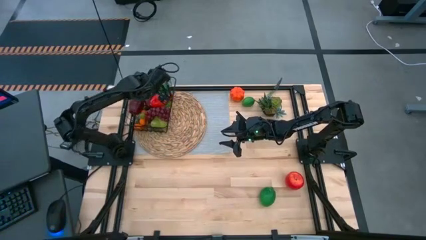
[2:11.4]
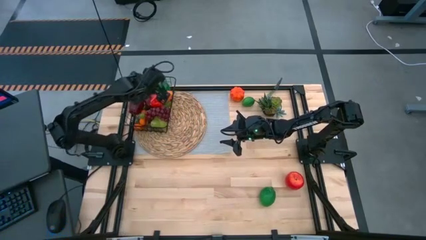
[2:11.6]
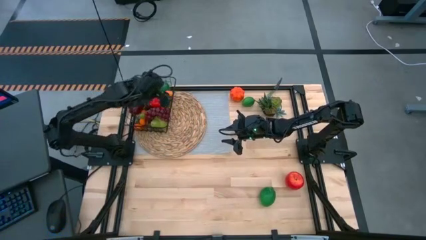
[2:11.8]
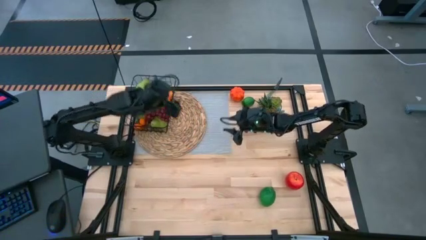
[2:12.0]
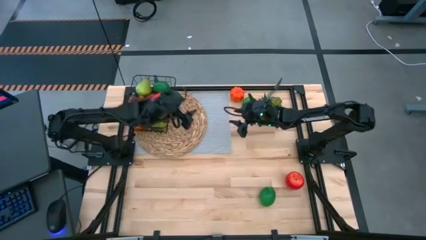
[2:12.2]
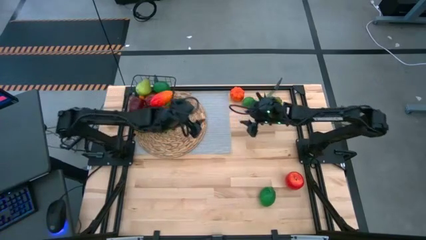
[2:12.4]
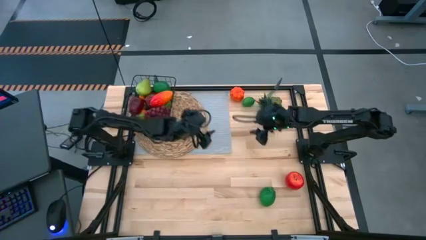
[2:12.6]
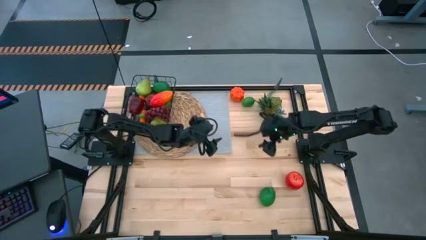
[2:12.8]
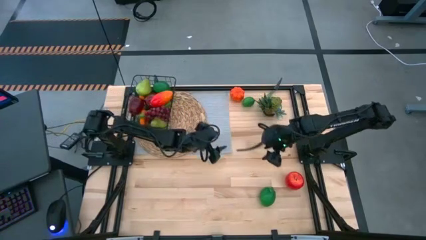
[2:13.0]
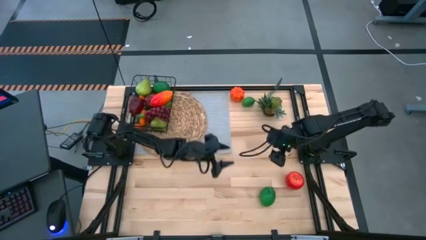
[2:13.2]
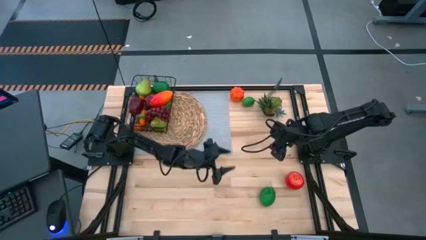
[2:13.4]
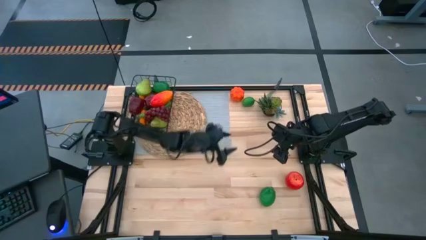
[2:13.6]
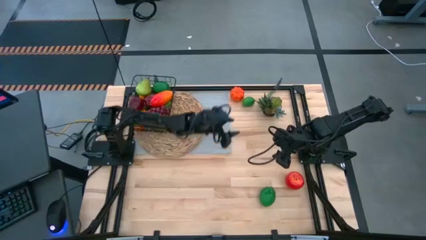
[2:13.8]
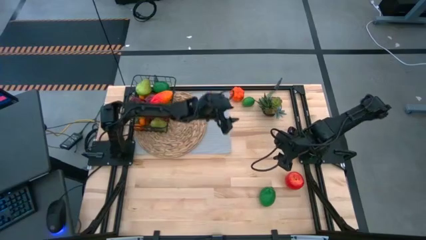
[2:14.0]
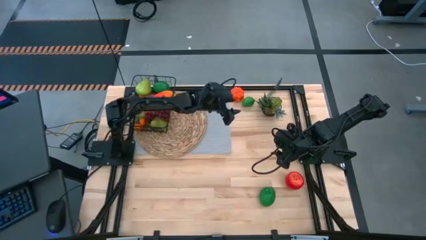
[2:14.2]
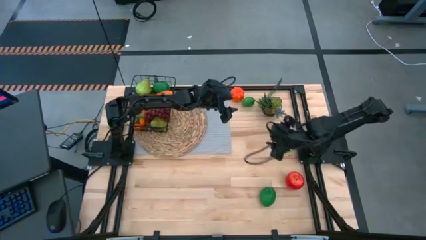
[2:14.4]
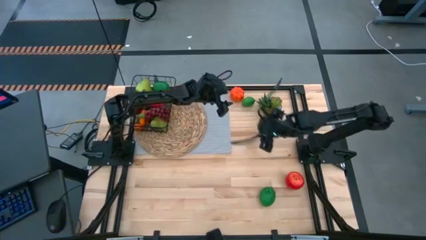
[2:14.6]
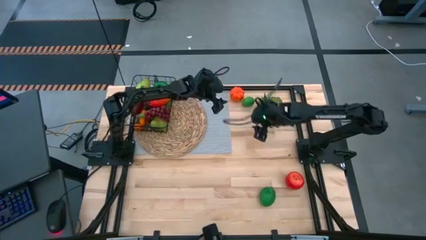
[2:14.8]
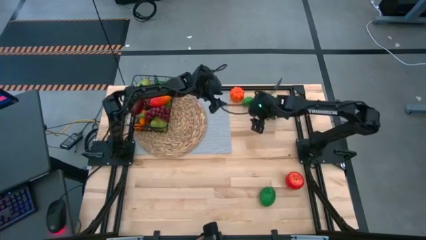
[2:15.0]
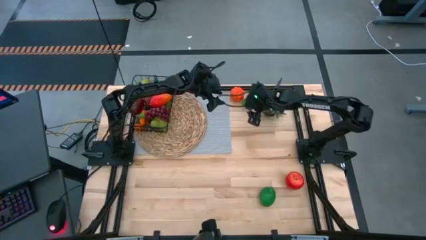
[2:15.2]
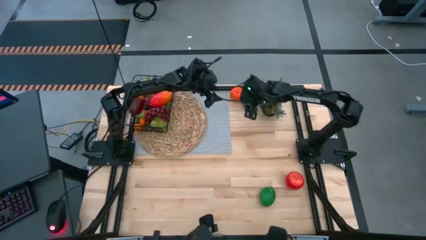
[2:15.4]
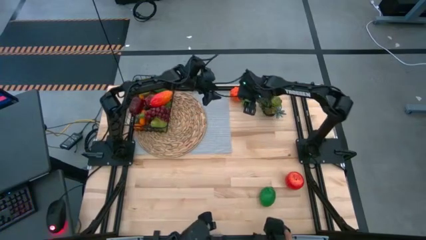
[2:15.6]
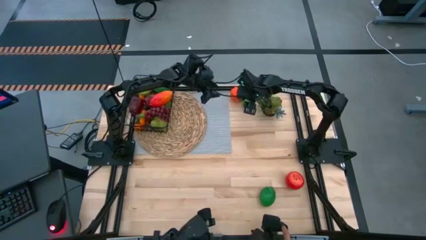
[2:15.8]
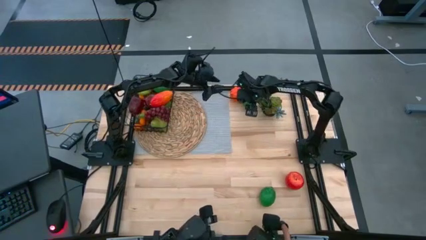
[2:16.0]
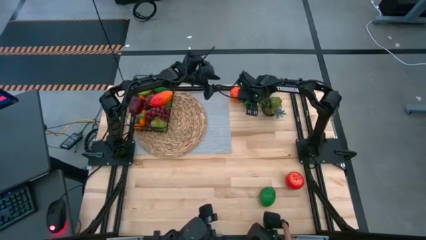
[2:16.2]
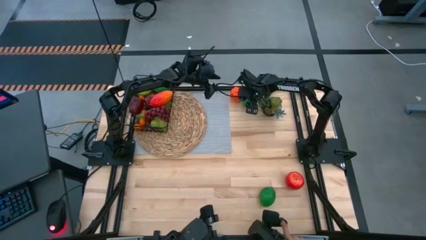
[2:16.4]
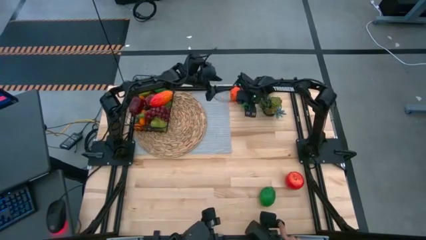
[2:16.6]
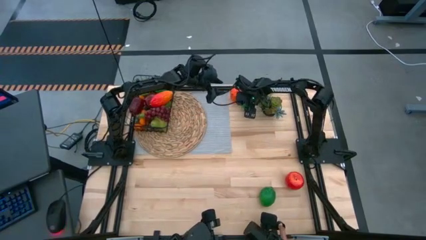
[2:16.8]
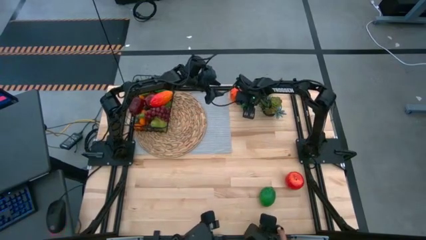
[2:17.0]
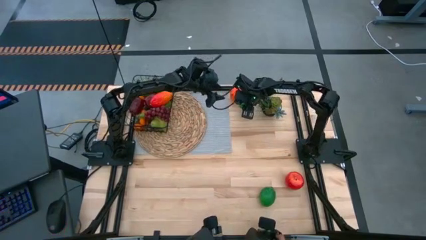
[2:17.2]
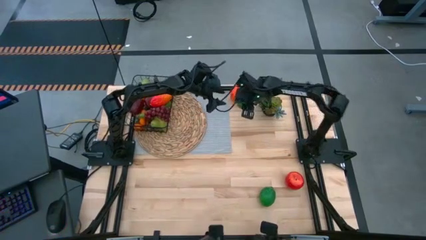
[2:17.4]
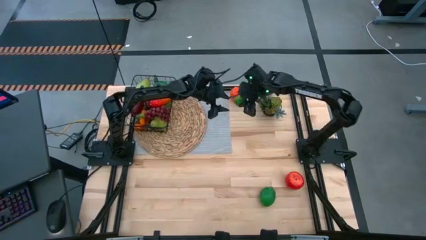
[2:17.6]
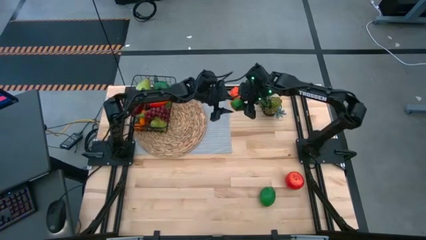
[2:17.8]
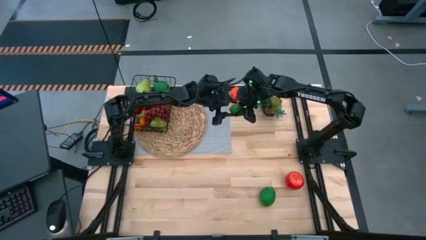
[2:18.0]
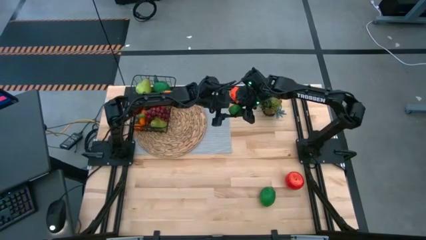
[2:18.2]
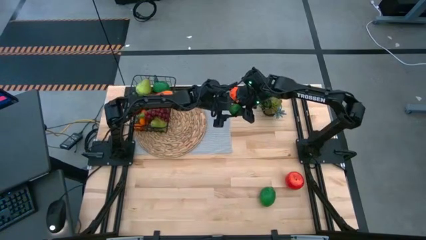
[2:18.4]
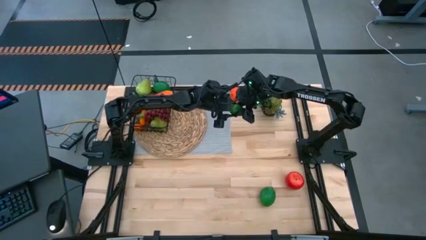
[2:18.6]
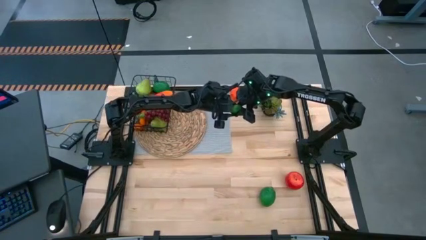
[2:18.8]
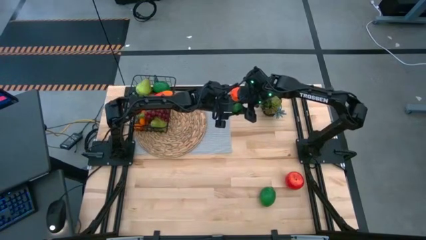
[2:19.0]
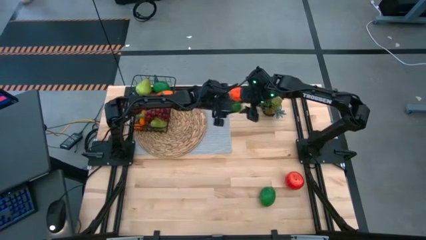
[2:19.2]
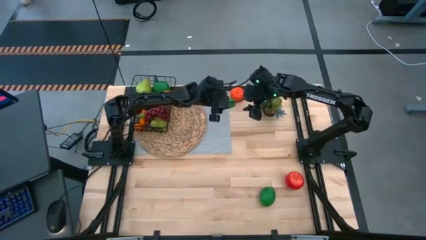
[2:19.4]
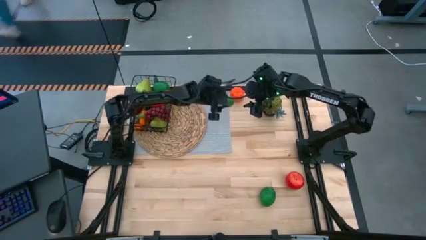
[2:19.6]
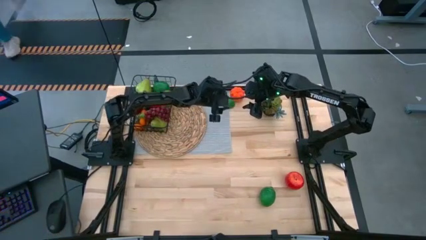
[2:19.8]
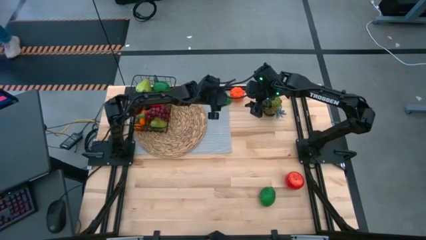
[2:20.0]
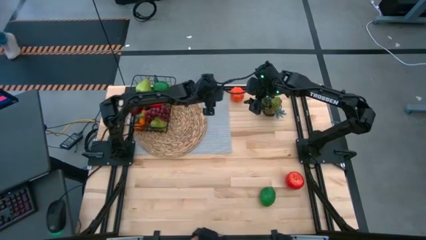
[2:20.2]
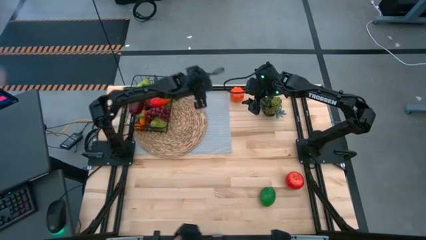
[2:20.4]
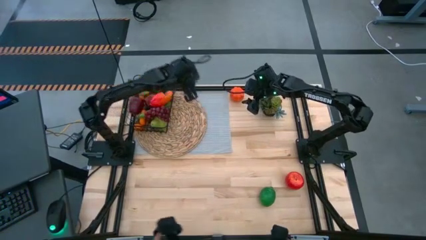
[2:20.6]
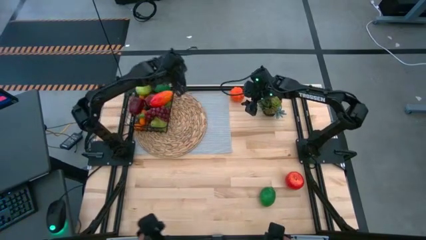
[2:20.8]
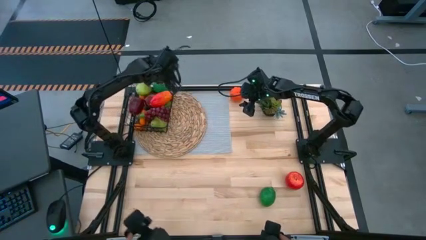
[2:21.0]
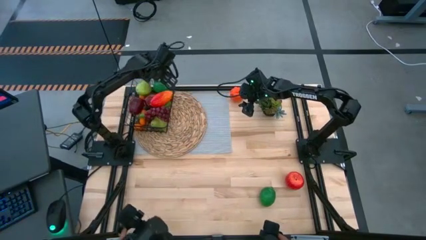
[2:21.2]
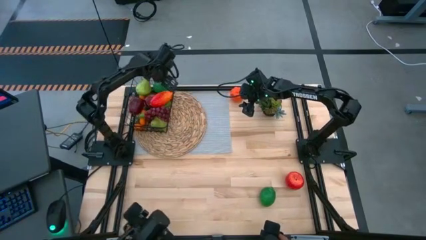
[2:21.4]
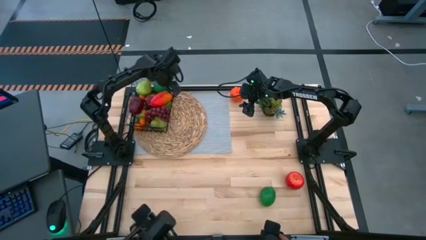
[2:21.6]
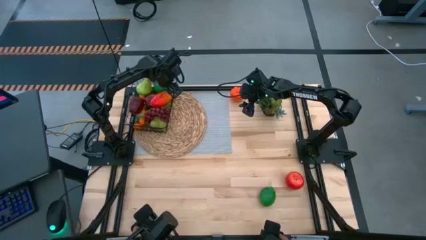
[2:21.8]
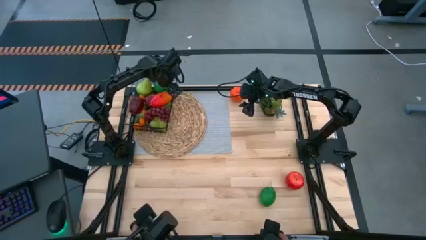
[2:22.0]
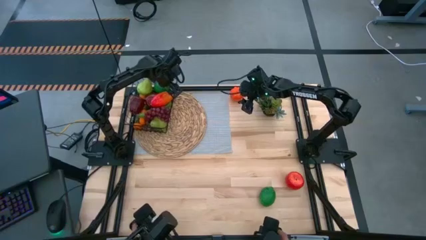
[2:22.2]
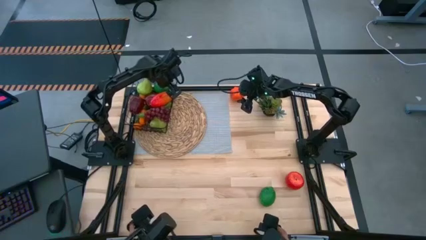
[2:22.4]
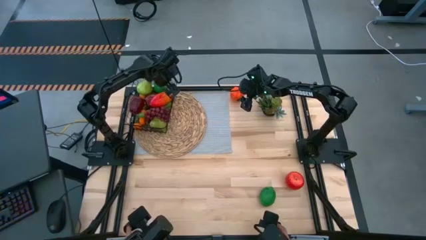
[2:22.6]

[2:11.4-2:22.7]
Task: Build produce basket
Put the top green lime into the wire basket

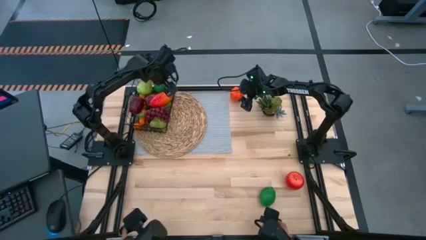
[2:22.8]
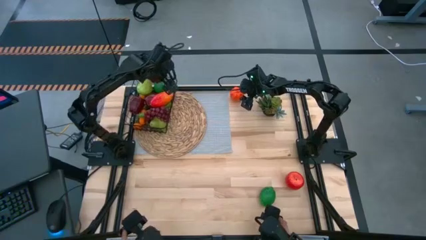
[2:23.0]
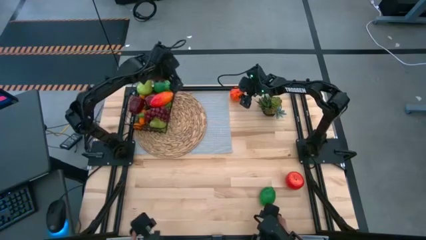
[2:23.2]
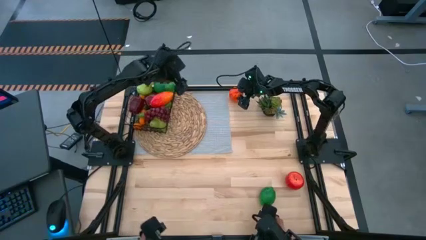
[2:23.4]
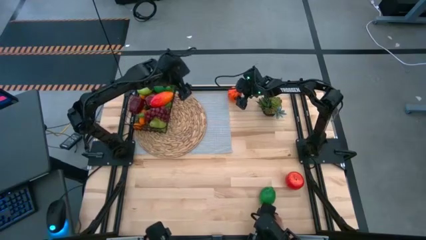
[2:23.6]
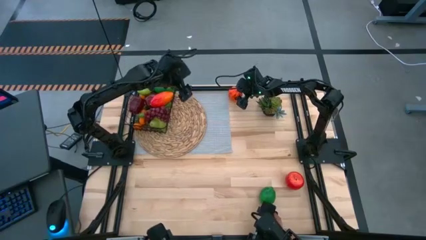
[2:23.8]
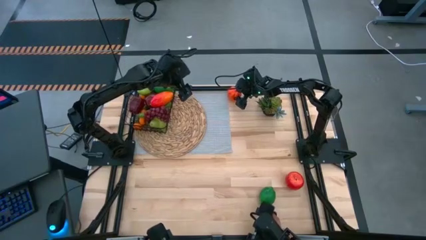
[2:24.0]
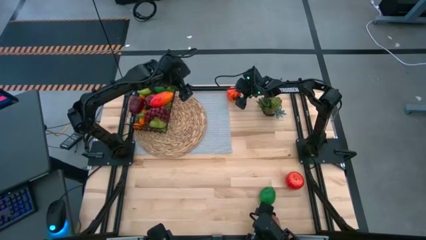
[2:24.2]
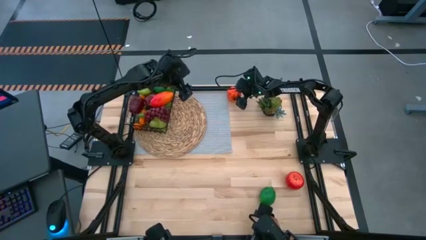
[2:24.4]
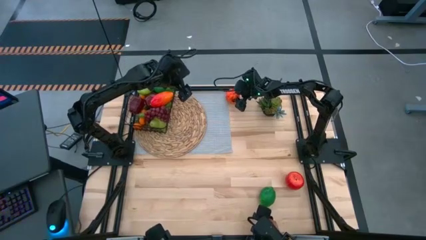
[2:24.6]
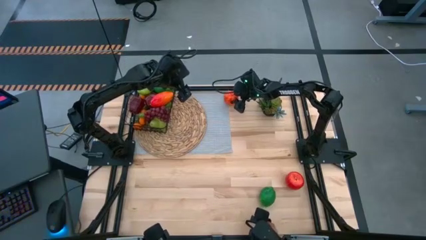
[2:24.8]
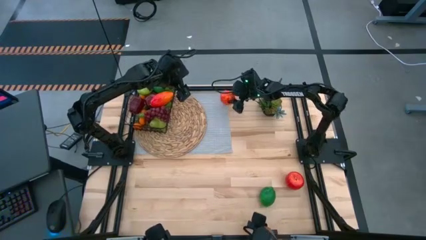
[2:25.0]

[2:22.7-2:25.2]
Put the orange pumpkin into the wire basket
